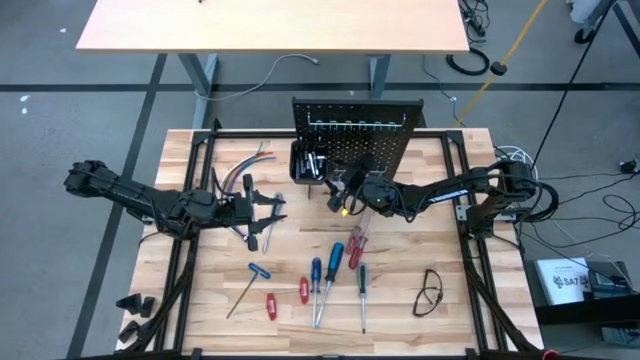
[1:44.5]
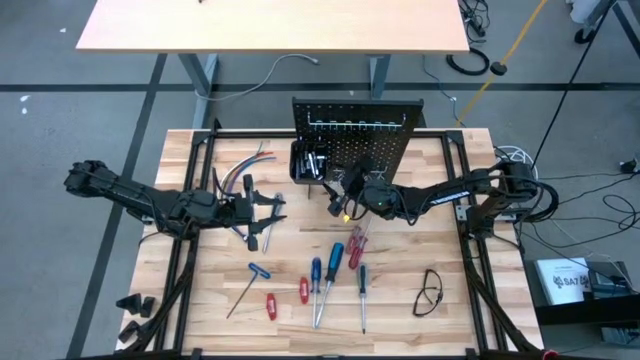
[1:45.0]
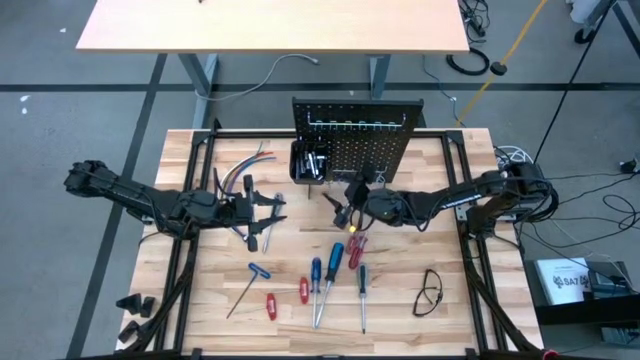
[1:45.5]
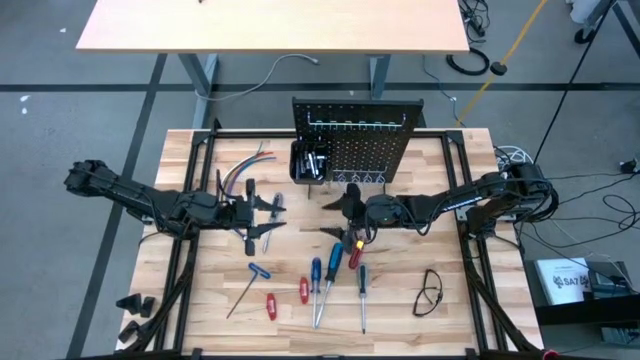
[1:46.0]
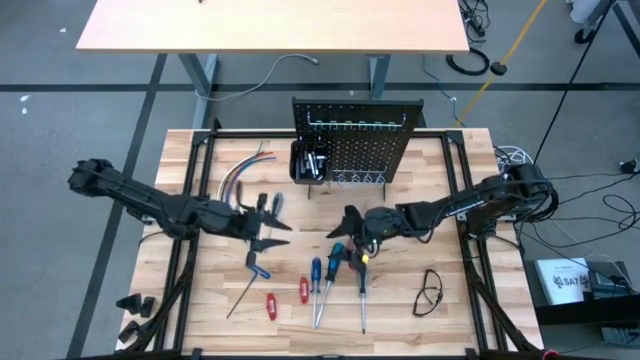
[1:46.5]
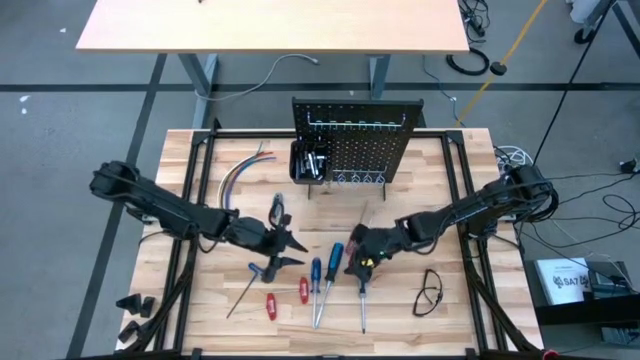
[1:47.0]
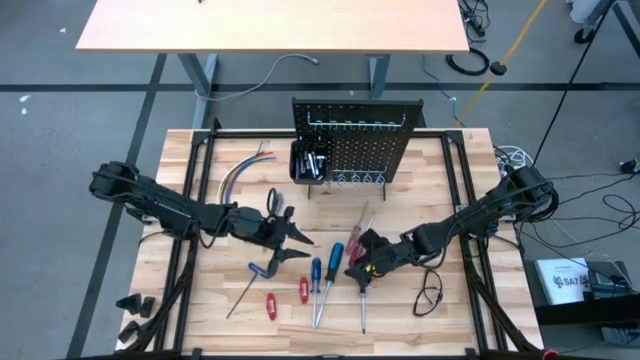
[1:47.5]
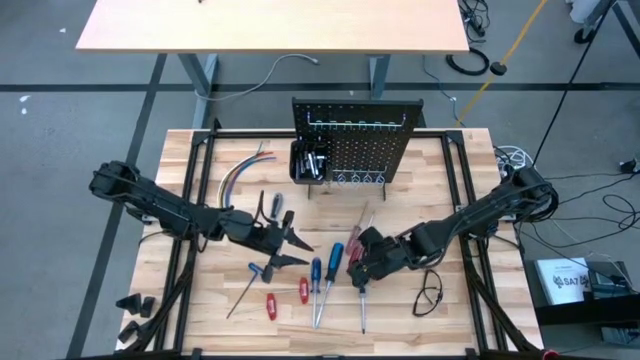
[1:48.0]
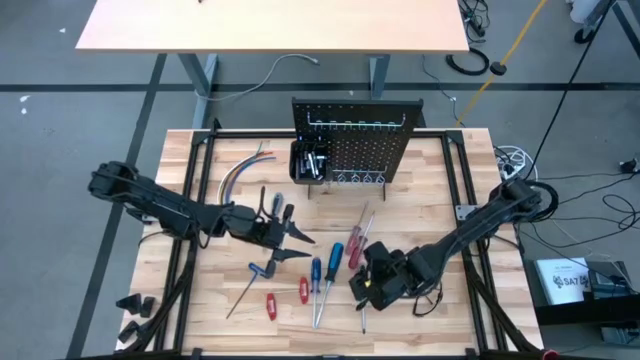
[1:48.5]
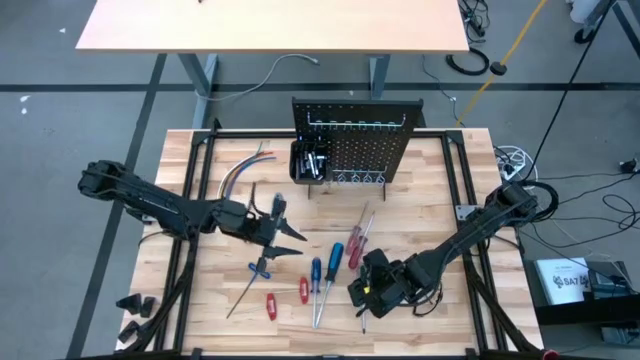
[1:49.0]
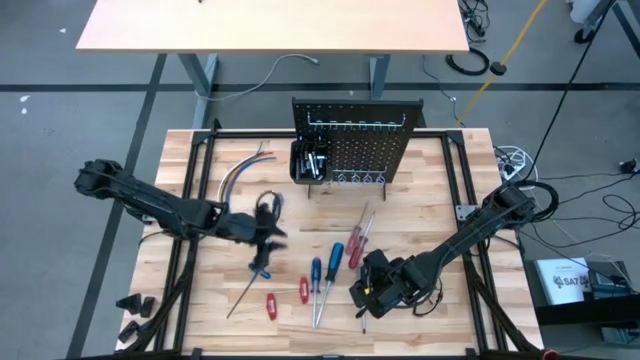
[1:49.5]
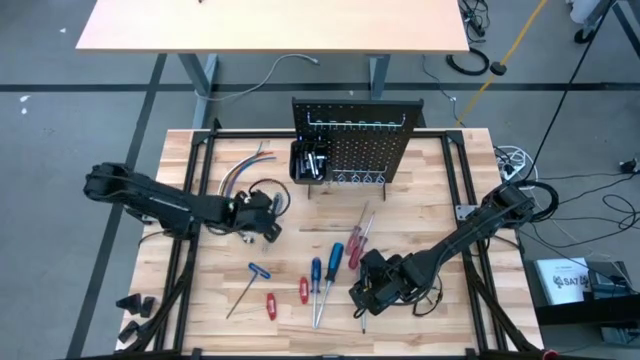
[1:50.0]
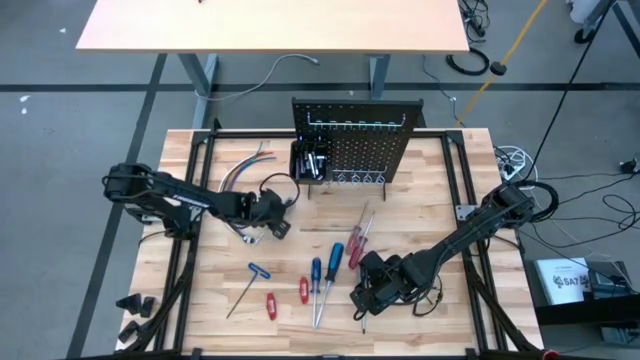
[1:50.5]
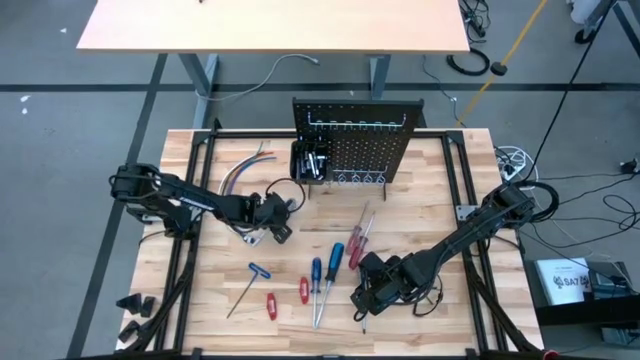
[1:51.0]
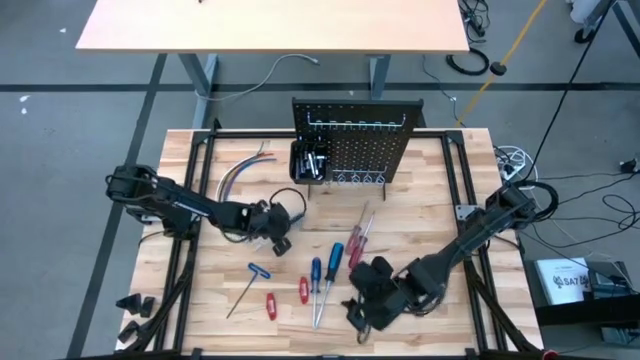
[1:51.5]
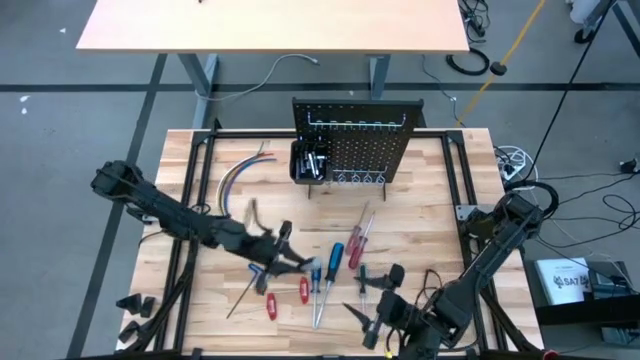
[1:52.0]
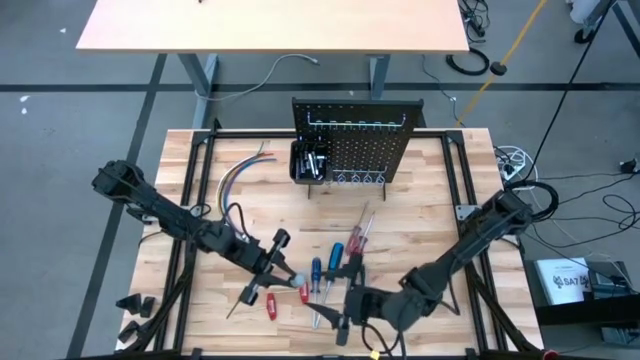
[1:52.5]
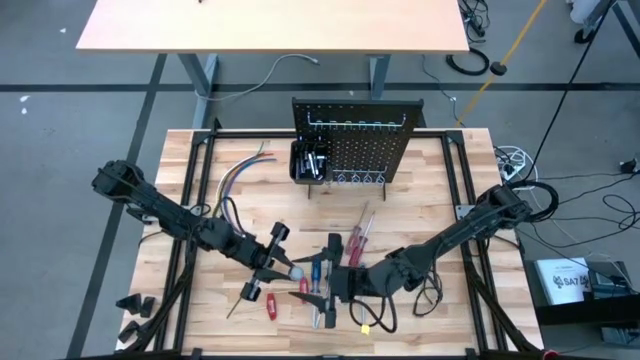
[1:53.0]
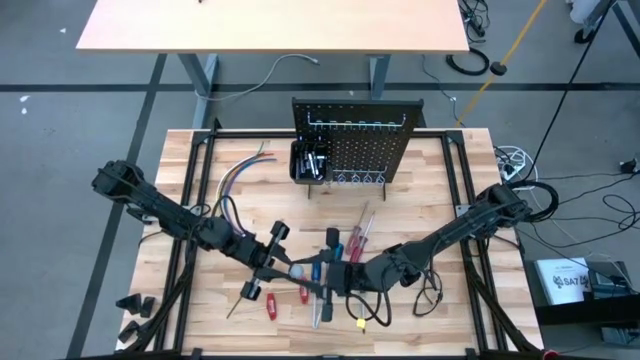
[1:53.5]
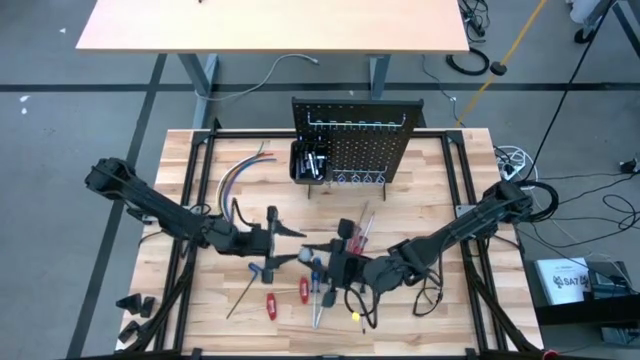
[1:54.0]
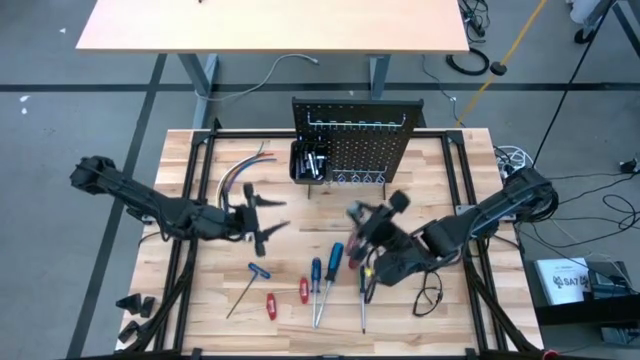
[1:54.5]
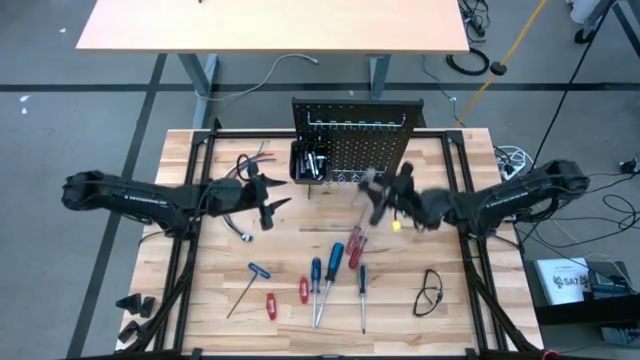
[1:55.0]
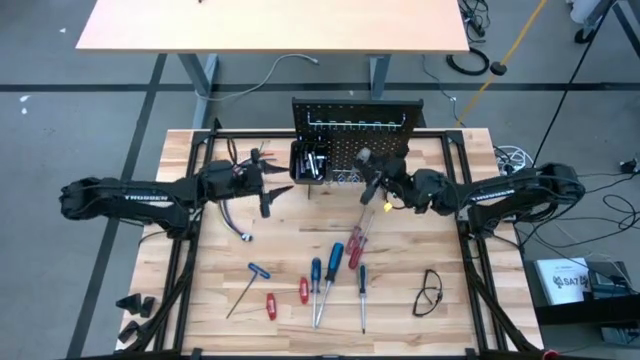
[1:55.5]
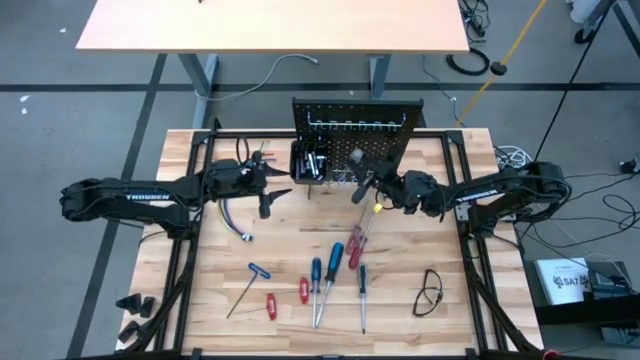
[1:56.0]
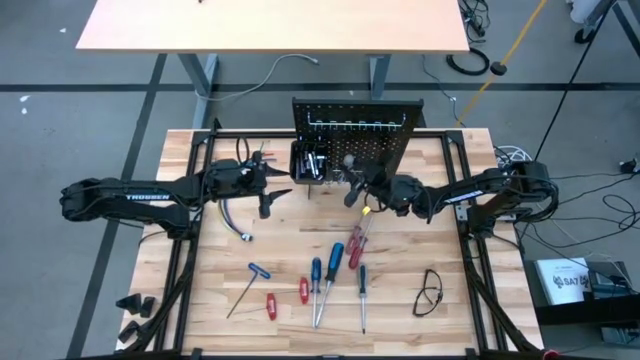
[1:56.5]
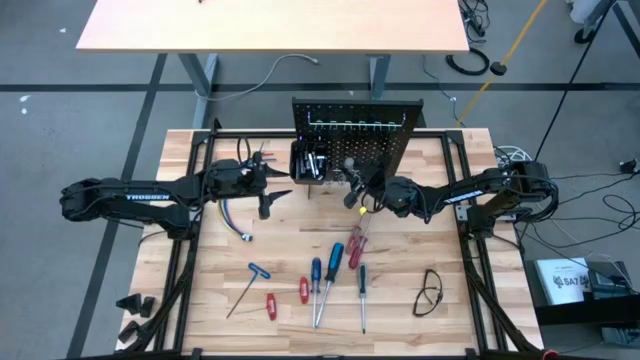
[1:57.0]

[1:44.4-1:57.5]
Task: Hang tools onto peg board
Hang the gray nut driver on the peg board

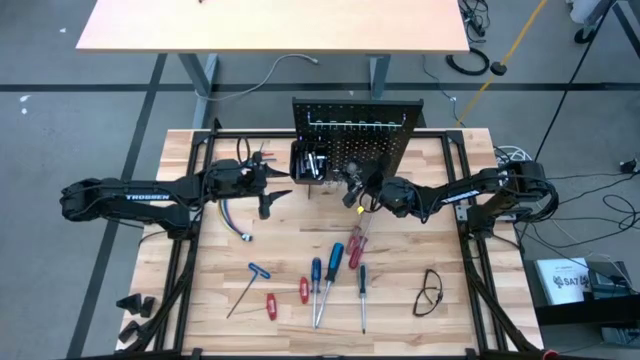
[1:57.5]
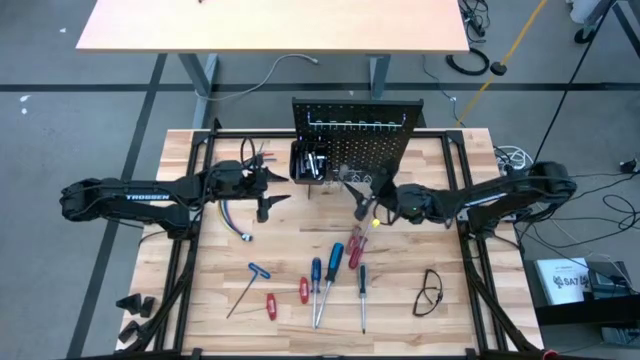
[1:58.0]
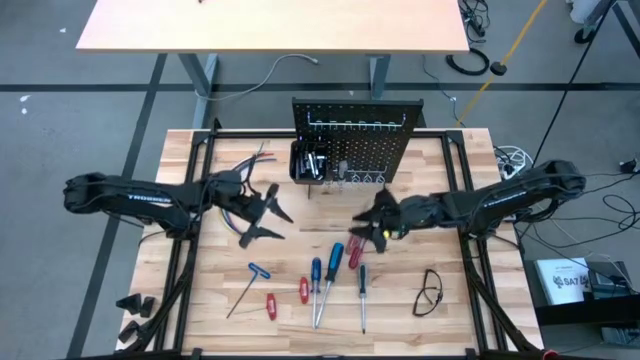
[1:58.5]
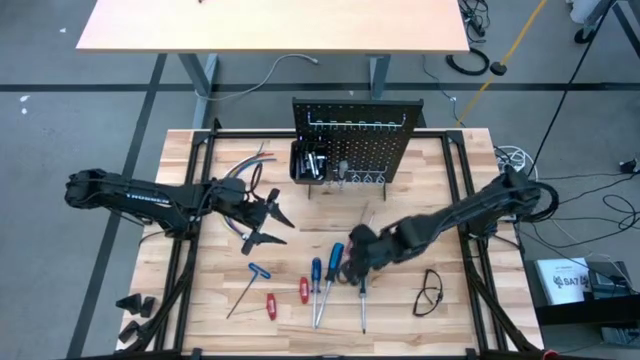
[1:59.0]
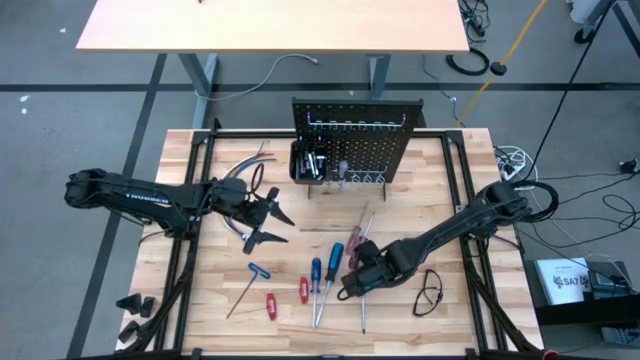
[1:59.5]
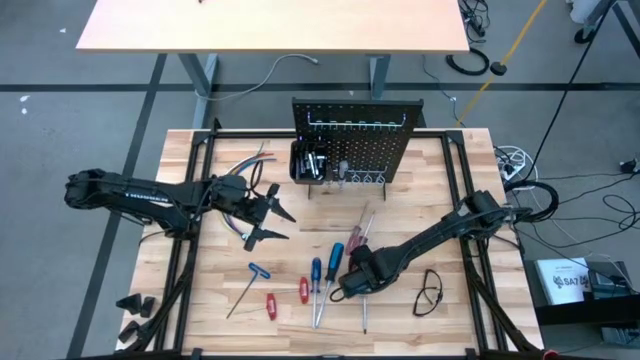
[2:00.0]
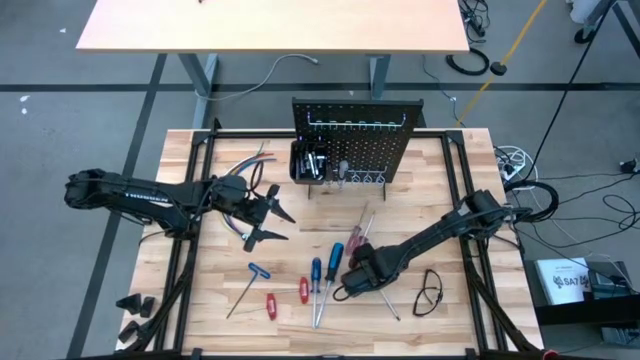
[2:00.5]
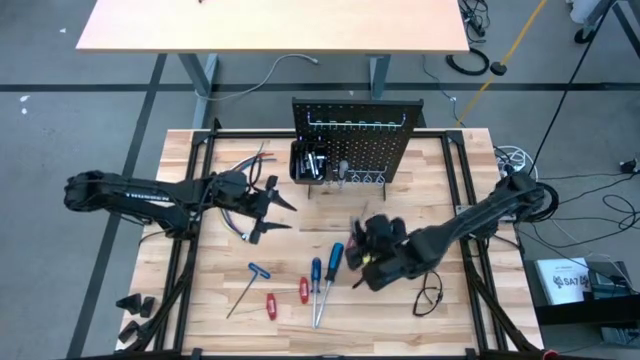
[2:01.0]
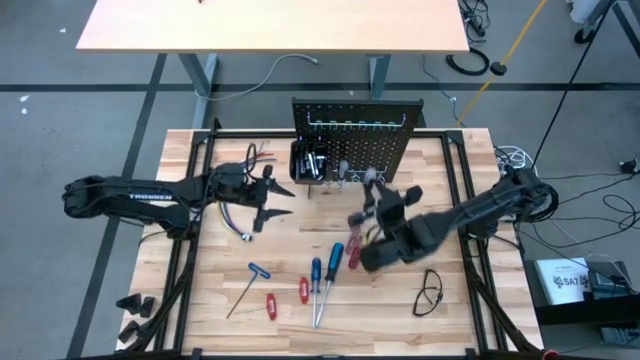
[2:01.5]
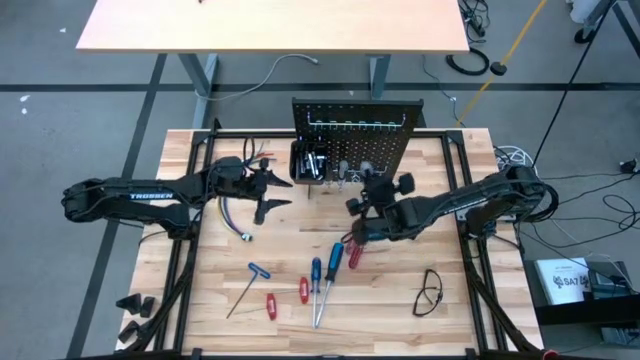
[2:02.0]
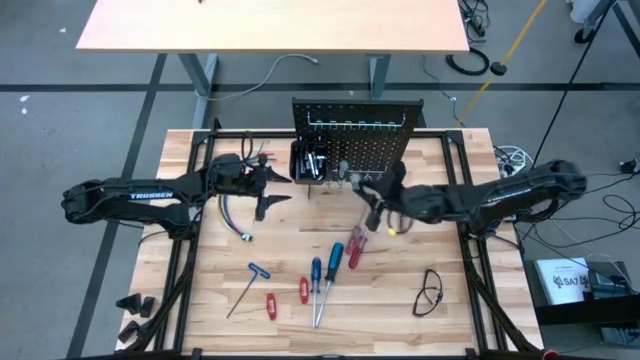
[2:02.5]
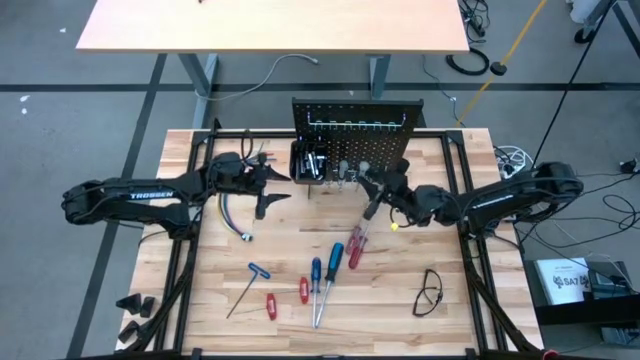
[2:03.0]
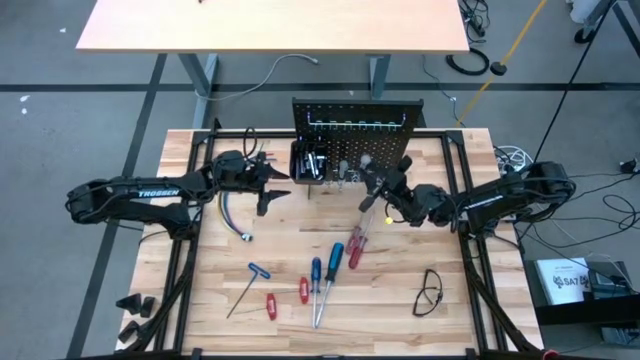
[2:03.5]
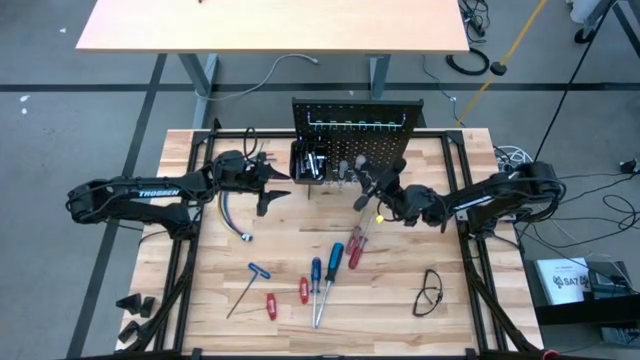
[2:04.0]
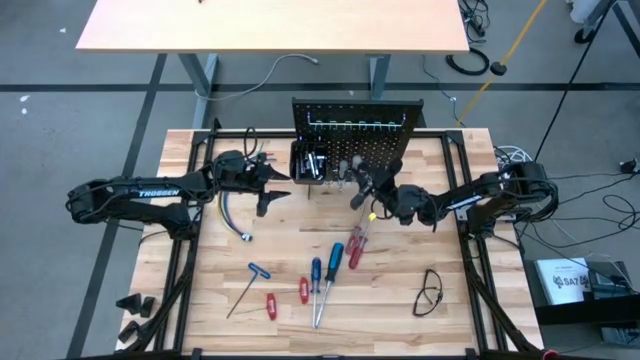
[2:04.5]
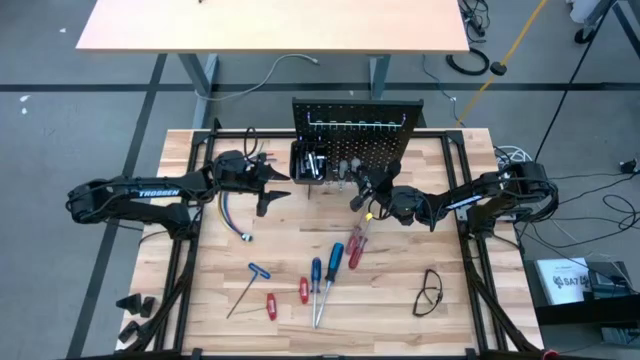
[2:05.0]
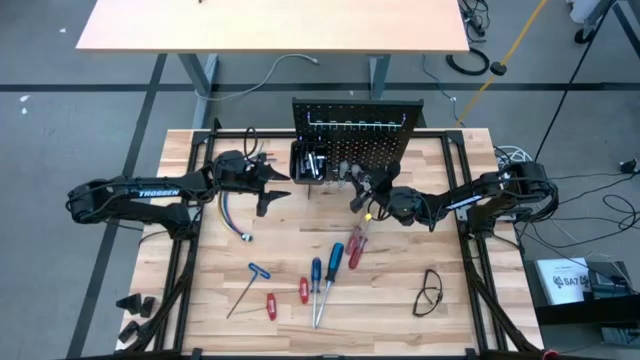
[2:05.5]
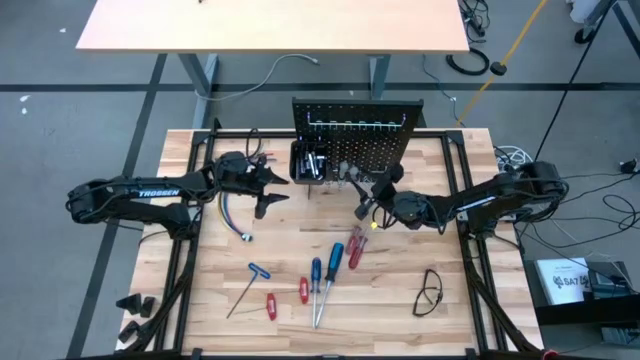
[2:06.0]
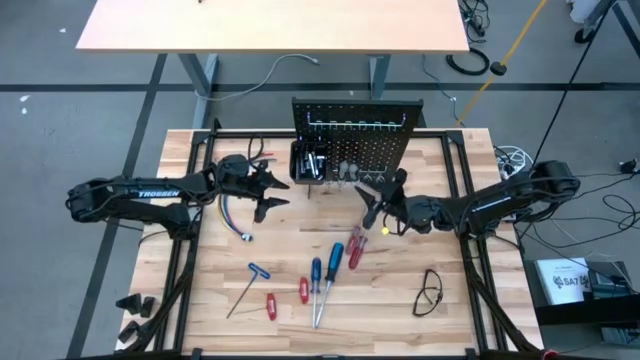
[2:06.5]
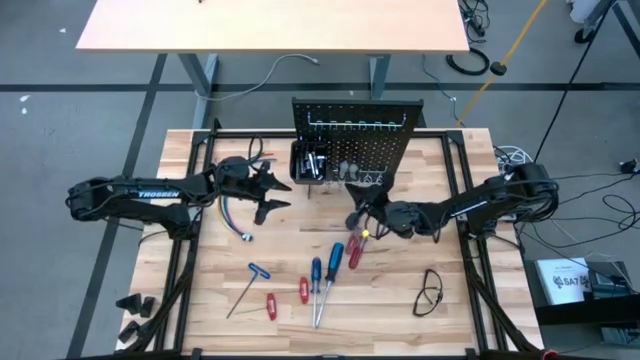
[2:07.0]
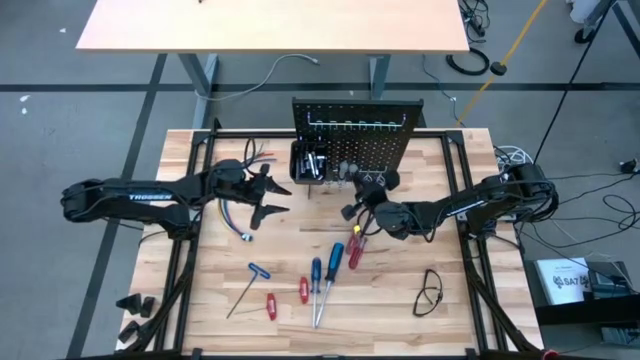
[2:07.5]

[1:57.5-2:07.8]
Hang the gray screwdriver on the peg board
